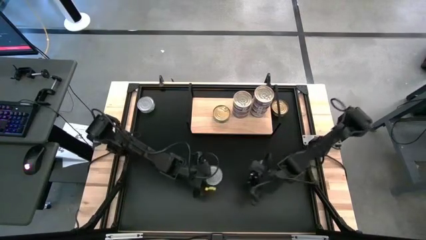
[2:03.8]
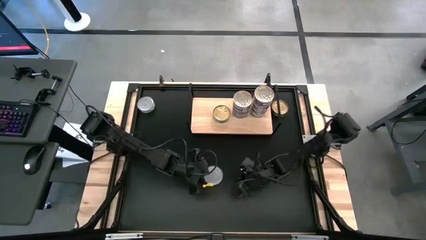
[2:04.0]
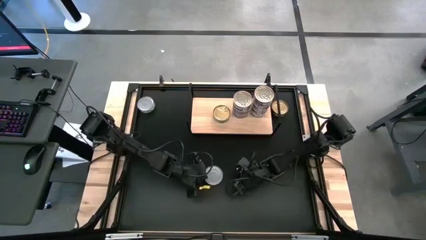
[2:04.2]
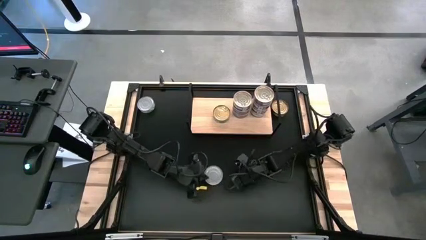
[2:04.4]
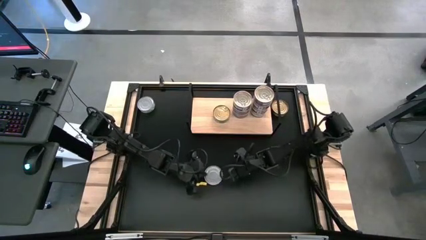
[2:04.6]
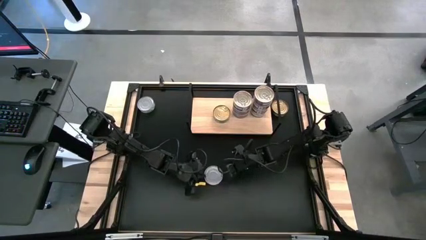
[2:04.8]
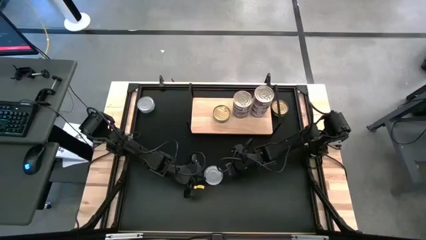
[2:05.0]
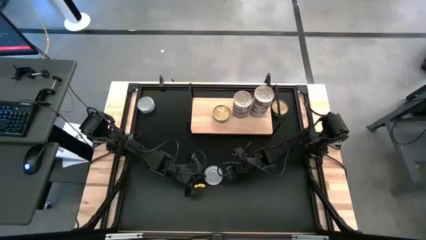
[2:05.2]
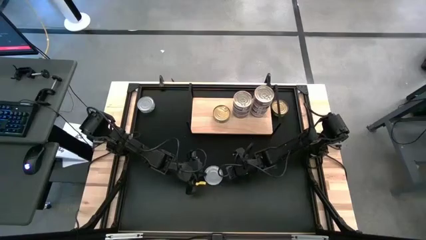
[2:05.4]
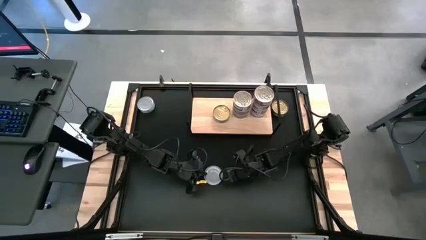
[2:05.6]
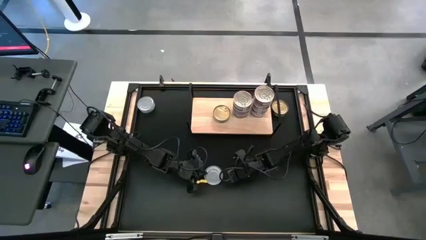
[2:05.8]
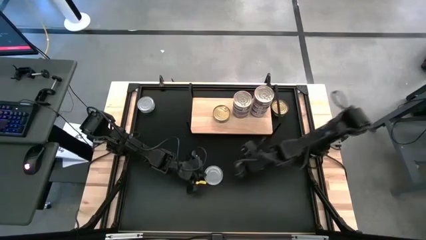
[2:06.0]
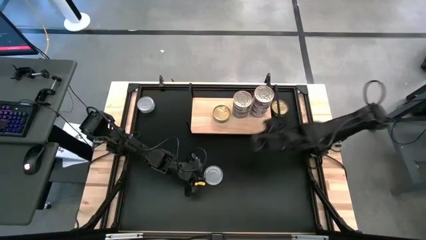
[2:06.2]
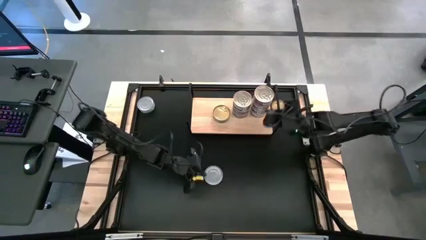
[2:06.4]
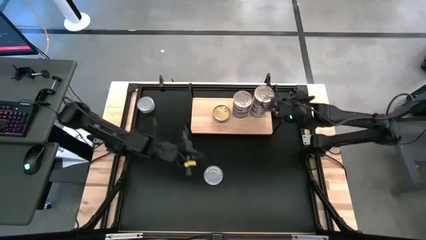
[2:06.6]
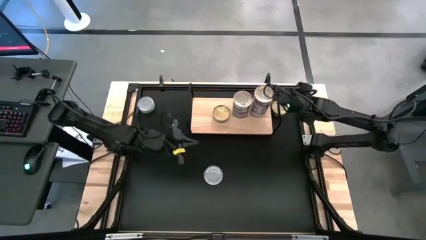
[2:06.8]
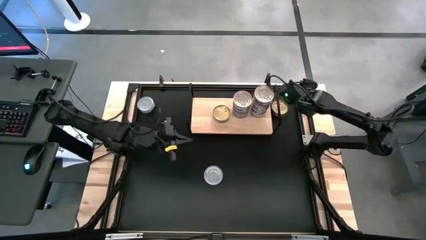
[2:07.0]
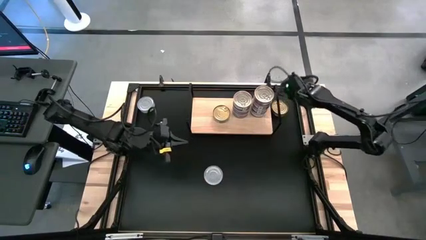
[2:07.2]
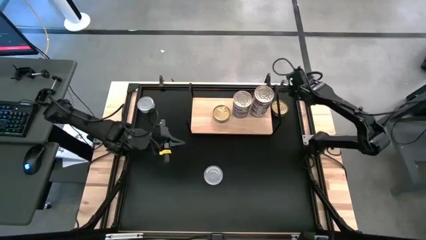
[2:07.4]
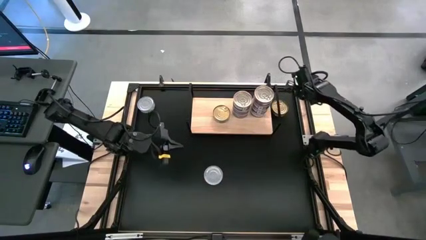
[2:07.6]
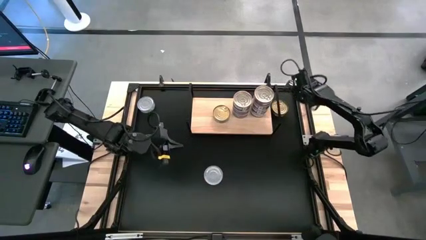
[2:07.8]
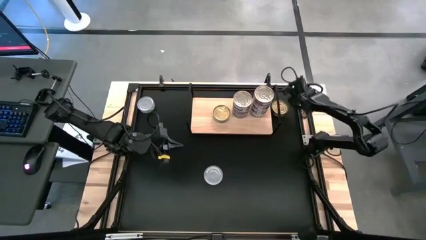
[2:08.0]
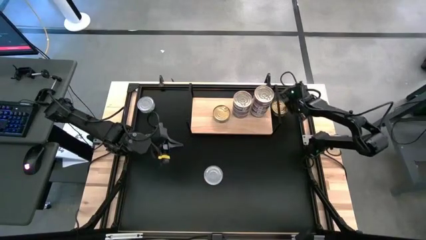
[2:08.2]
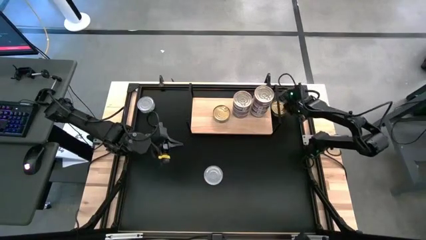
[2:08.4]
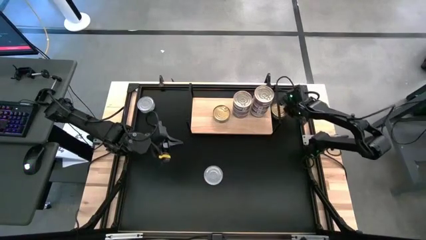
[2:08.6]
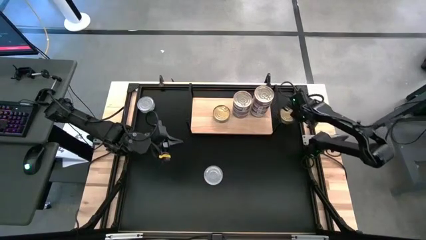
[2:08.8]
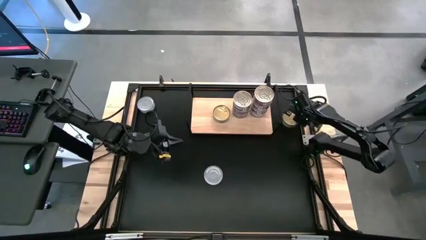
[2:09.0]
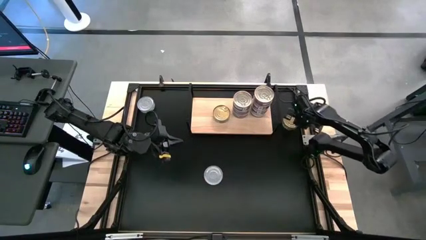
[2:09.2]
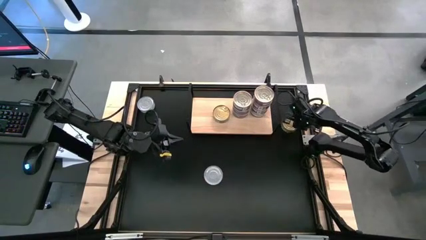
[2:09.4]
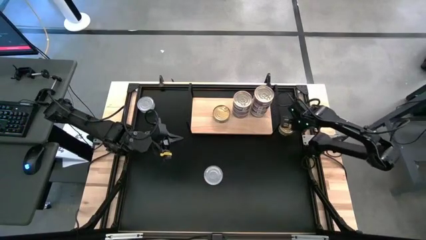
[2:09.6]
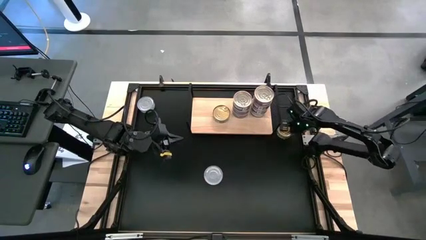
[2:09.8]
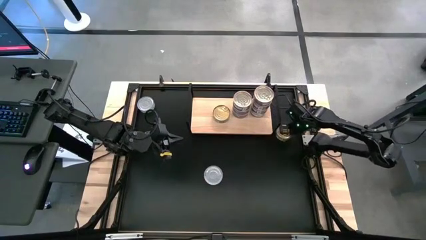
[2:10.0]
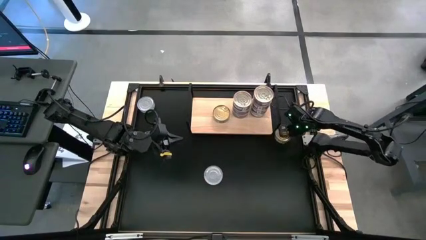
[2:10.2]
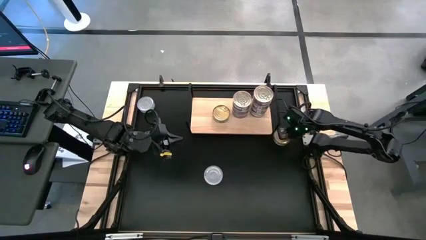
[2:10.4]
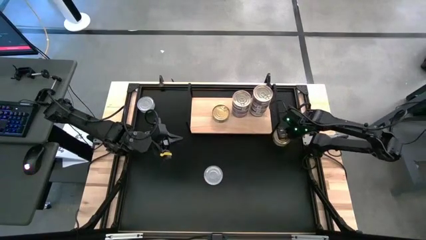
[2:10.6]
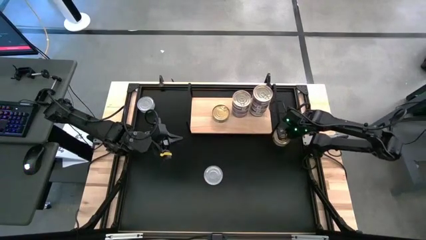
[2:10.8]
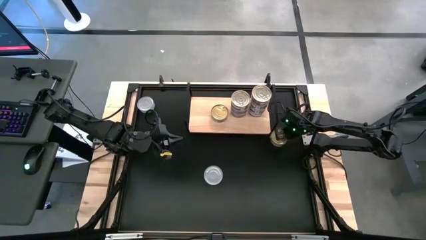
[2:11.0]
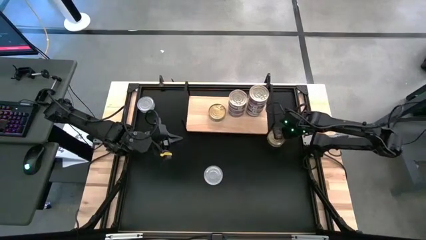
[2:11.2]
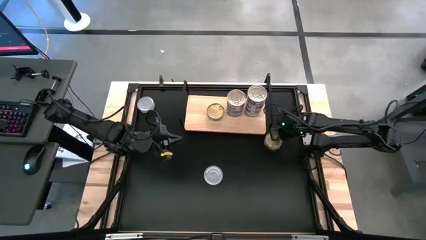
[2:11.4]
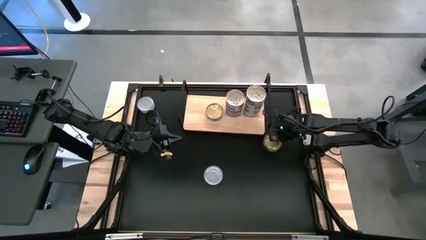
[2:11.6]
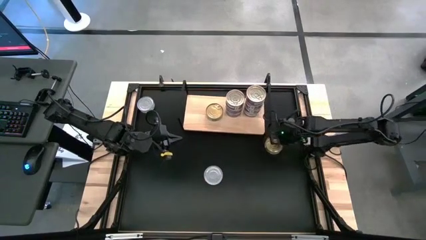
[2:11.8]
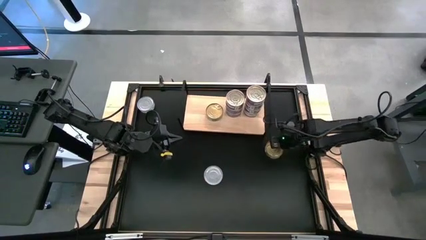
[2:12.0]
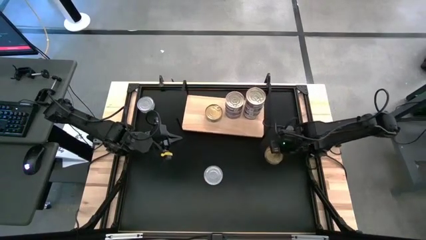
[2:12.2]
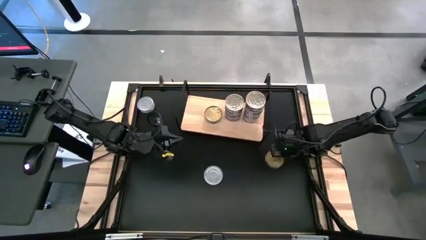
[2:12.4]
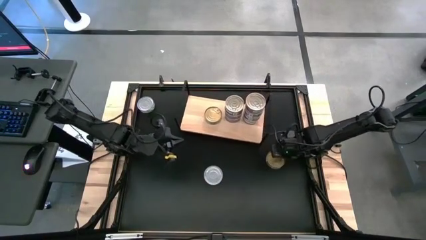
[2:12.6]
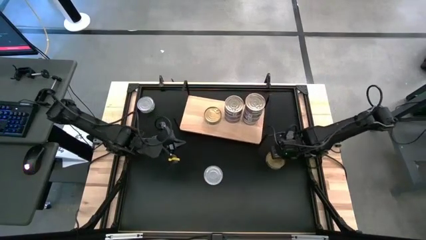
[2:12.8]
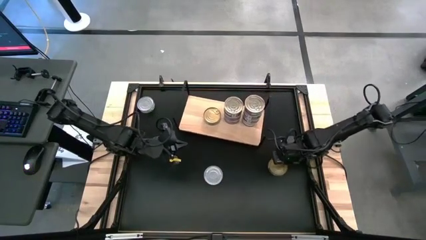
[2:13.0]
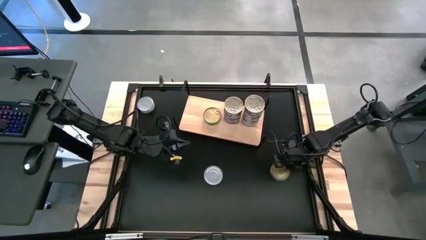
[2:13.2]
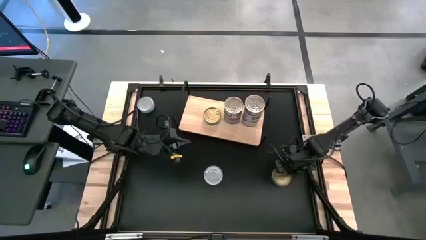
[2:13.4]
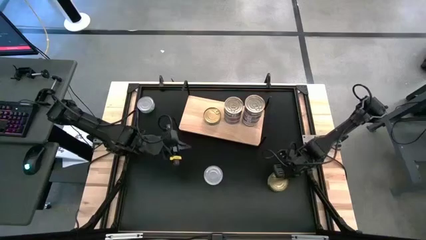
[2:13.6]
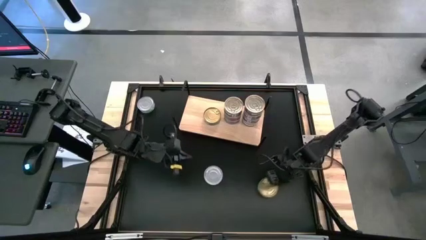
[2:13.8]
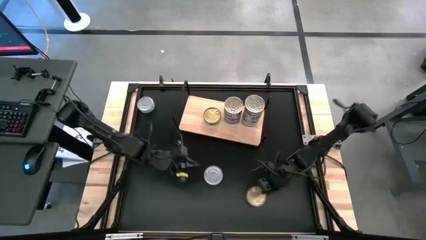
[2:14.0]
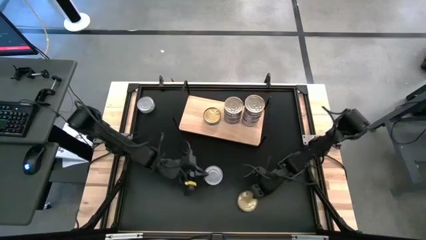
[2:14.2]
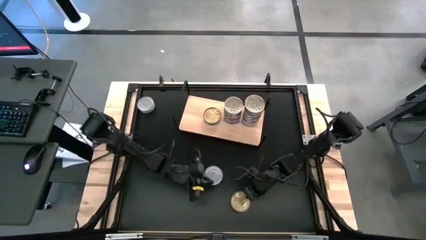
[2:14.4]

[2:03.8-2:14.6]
Task: Stack canned seafood by type on shelf
Stack the green tuna can on top of the other green tuna can on the shelf

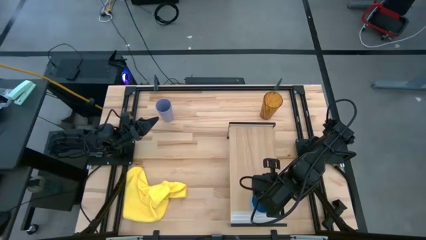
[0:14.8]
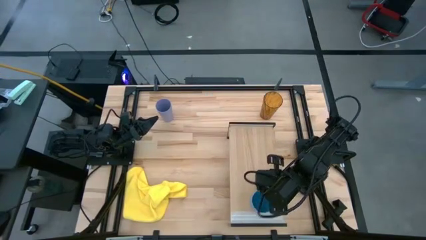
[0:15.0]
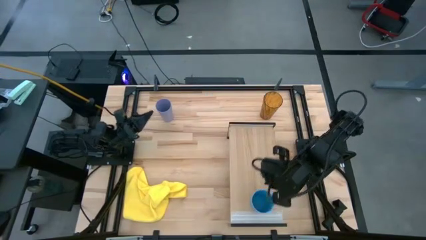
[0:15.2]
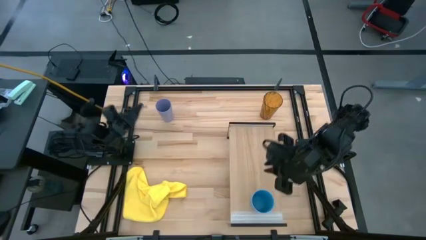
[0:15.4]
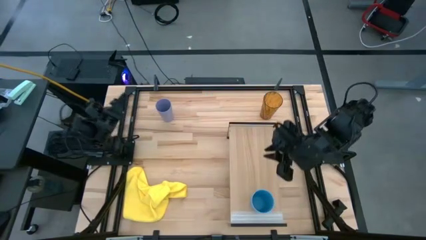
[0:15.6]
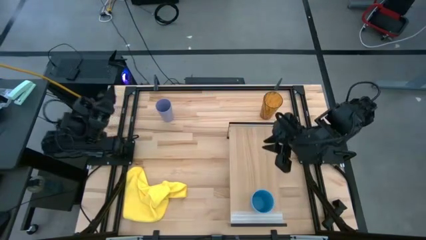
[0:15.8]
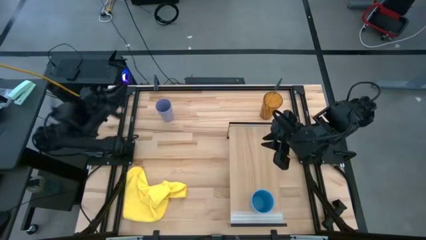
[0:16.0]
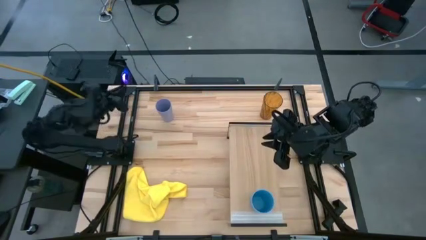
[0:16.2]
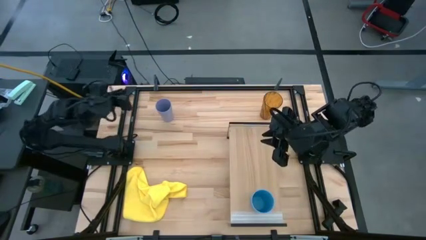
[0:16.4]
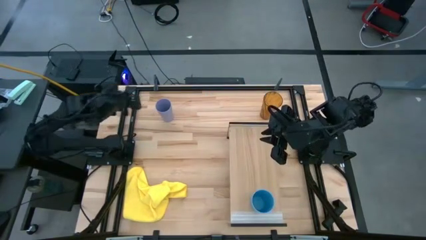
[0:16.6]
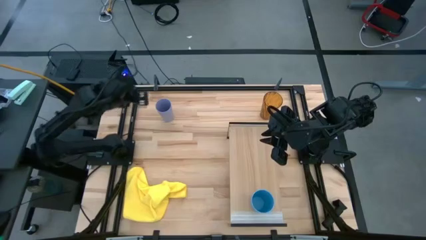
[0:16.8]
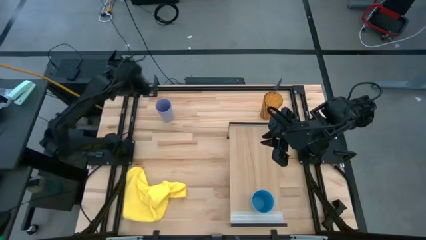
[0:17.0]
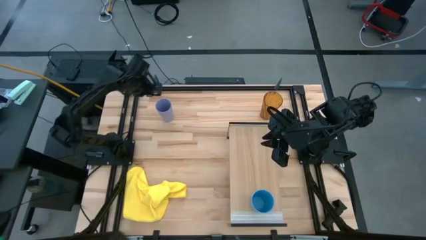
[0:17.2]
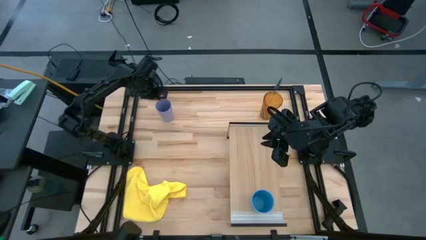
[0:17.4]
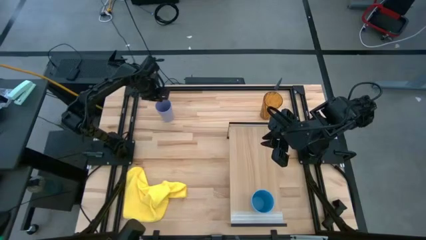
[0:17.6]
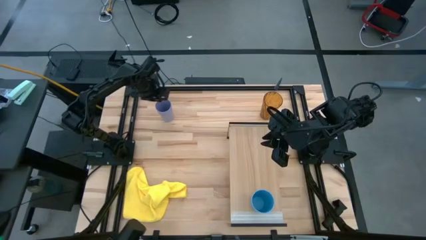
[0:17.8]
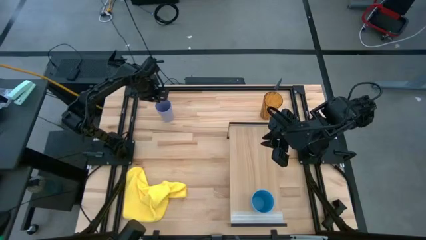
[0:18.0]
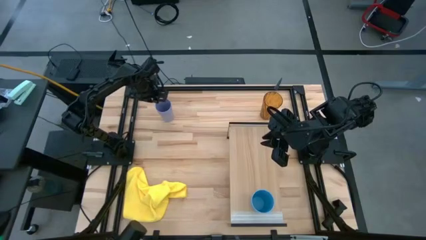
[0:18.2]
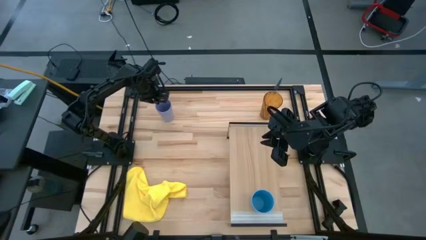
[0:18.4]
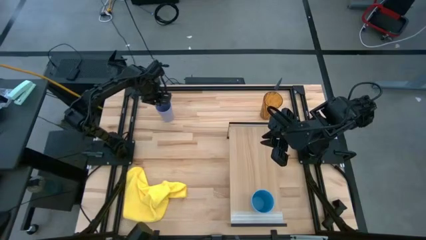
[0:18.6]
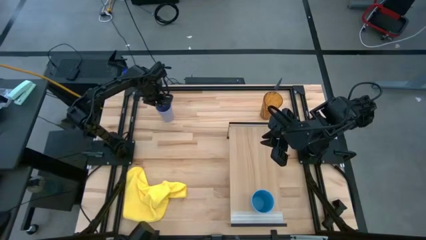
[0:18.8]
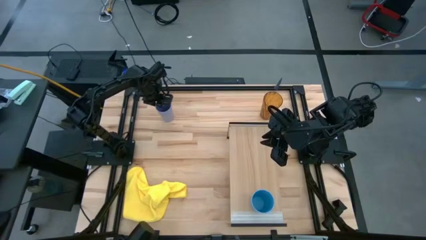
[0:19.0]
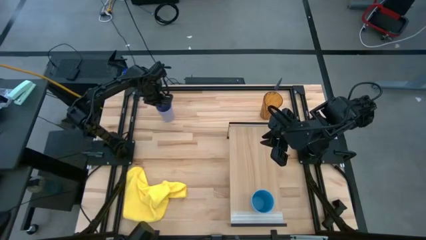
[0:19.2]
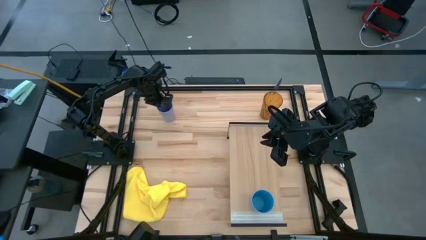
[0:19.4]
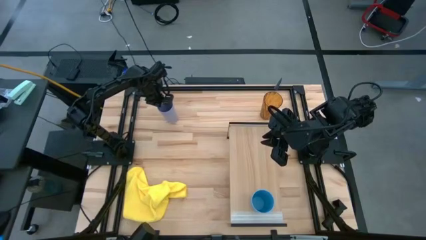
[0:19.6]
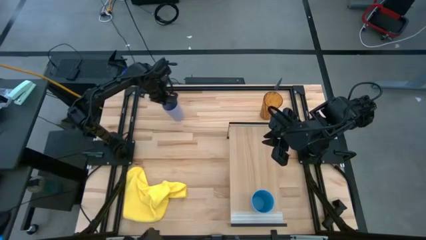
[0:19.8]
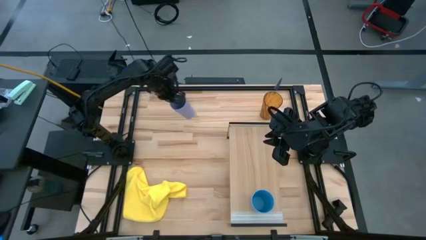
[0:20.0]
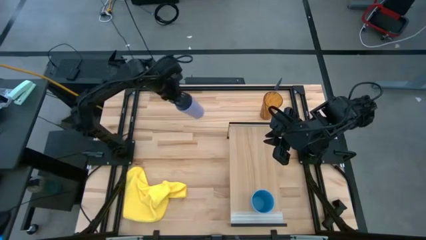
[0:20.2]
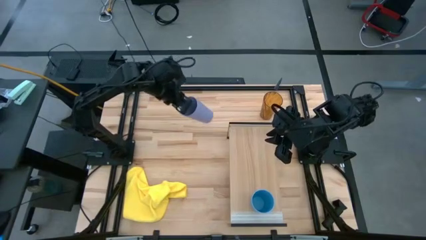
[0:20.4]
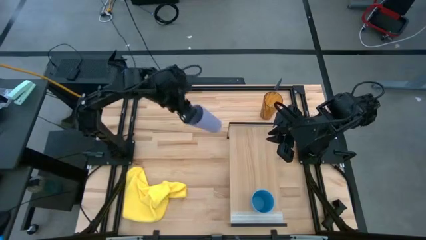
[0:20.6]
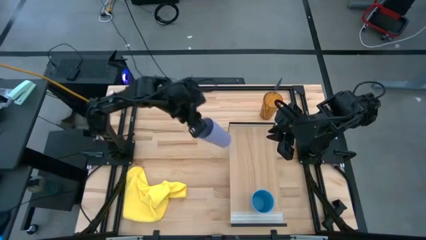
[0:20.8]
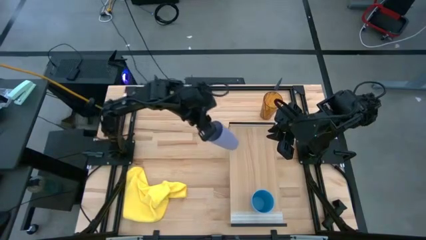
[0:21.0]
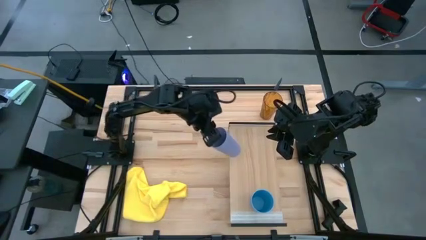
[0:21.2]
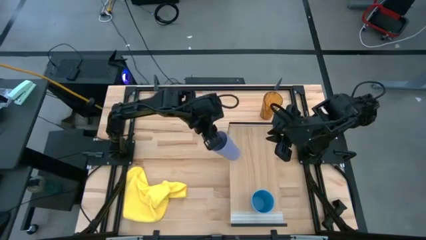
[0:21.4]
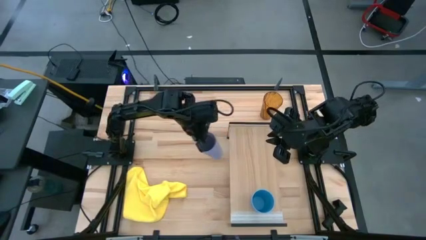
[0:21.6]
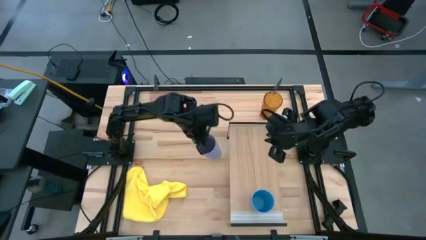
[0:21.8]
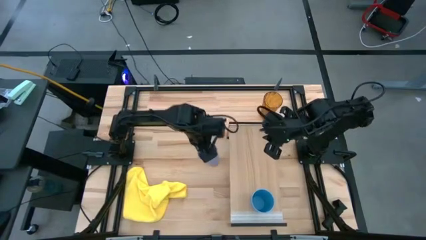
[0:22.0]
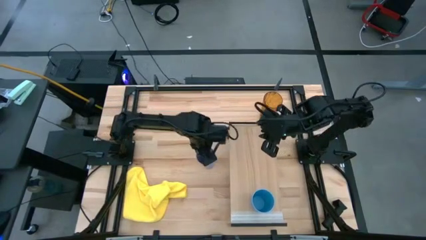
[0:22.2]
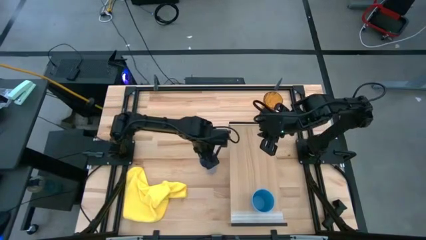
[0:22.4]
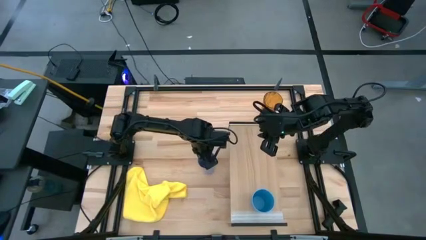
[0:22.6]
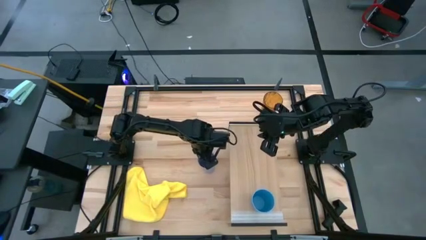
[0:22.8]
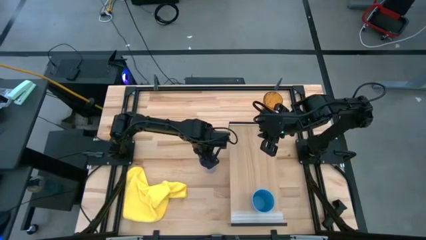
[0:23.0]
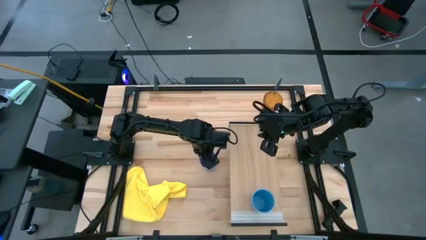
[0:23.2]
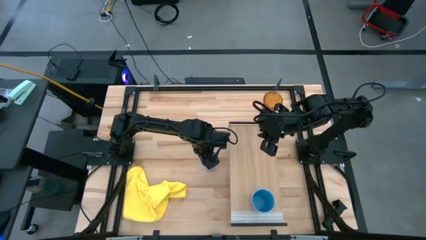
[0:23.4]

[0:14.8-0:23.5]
Task: Stack small to large cups/mugs on shelf
Move the purple cup
